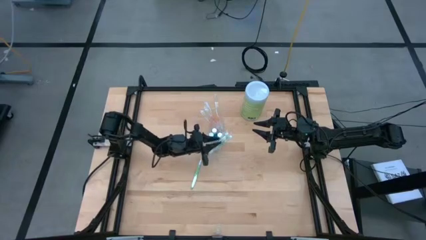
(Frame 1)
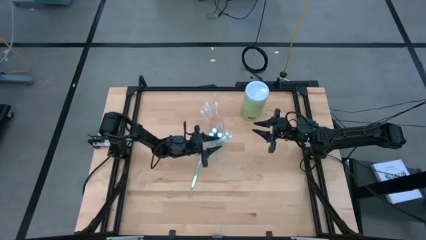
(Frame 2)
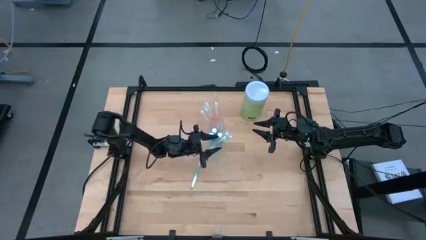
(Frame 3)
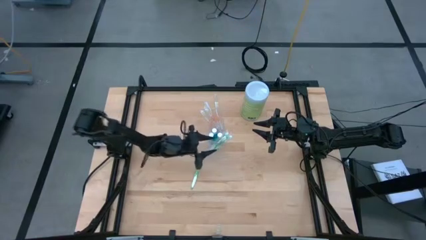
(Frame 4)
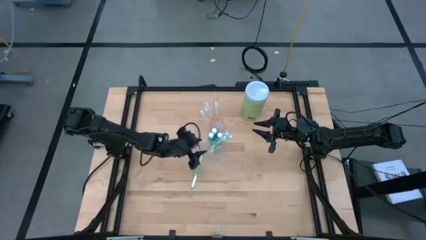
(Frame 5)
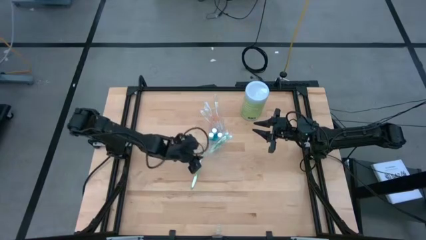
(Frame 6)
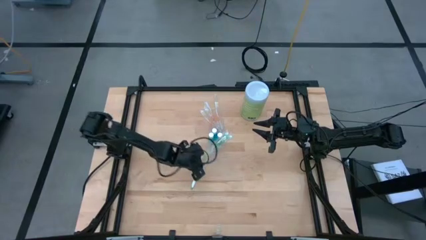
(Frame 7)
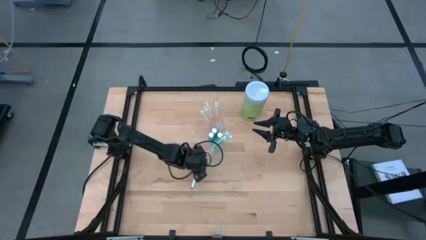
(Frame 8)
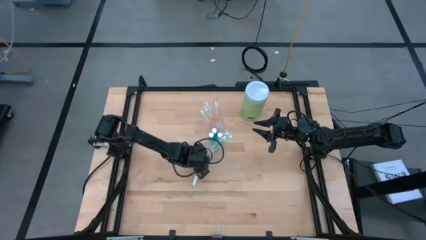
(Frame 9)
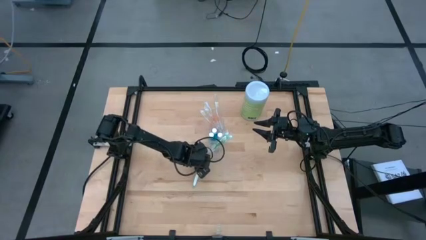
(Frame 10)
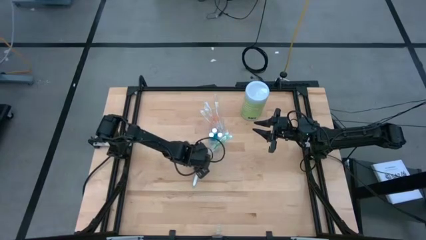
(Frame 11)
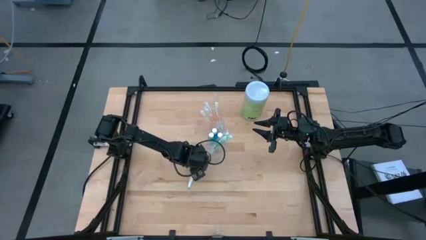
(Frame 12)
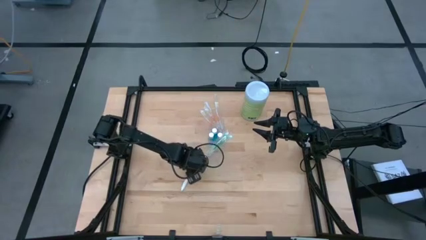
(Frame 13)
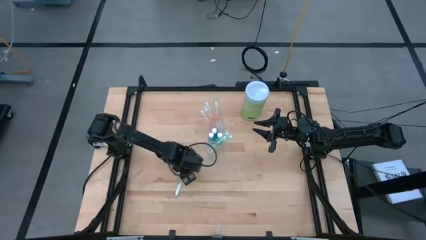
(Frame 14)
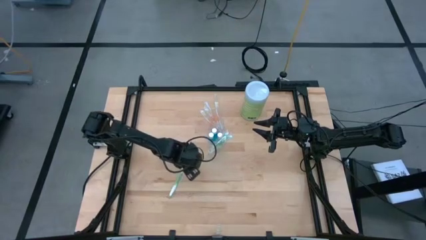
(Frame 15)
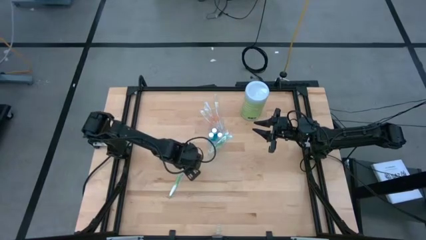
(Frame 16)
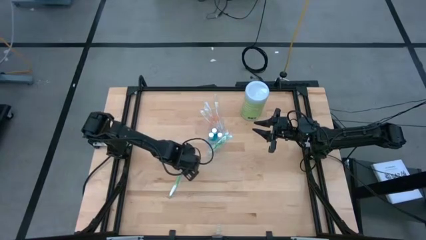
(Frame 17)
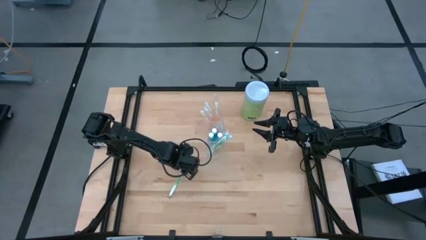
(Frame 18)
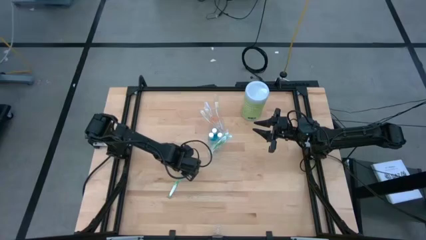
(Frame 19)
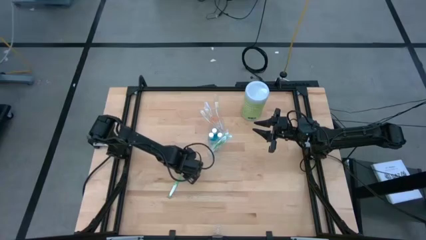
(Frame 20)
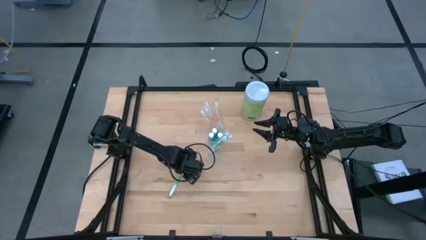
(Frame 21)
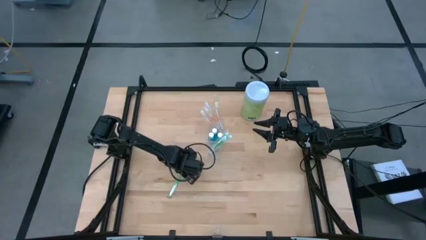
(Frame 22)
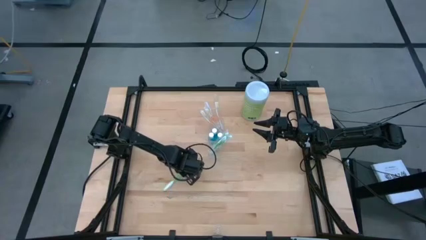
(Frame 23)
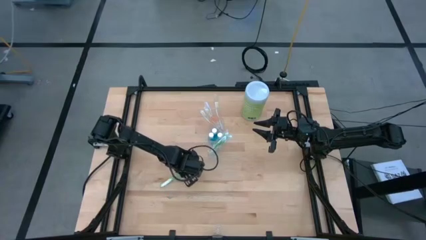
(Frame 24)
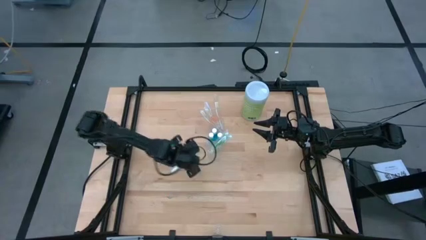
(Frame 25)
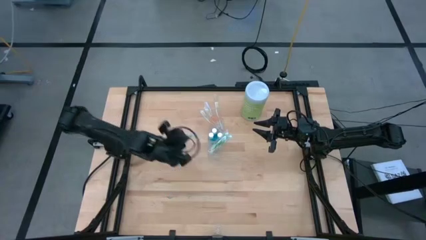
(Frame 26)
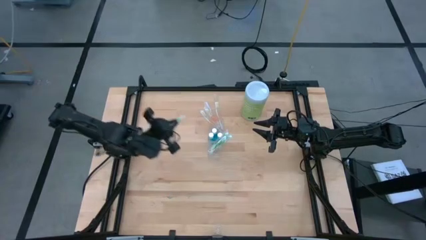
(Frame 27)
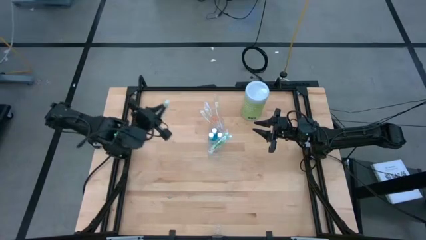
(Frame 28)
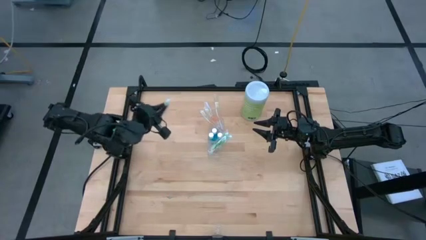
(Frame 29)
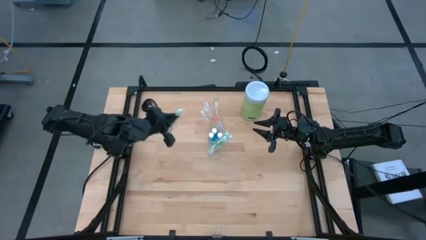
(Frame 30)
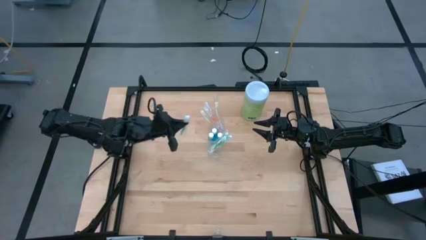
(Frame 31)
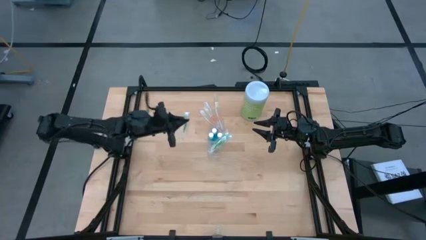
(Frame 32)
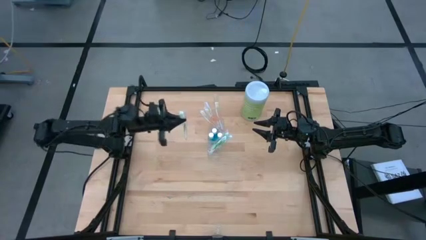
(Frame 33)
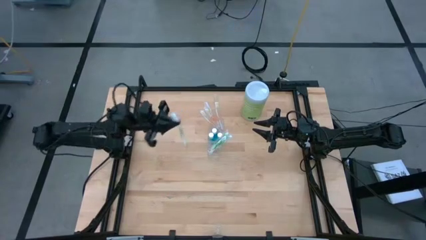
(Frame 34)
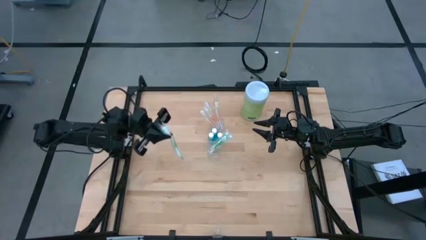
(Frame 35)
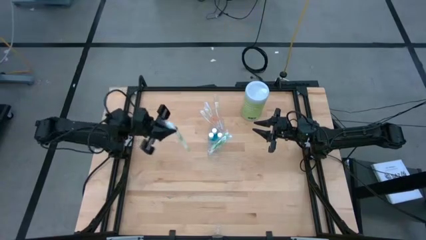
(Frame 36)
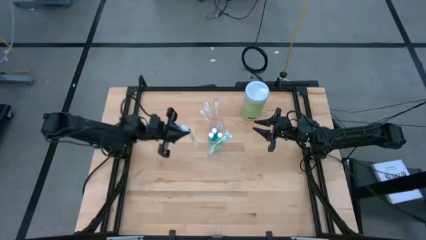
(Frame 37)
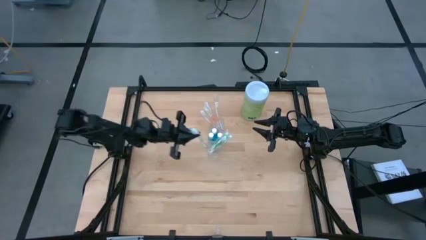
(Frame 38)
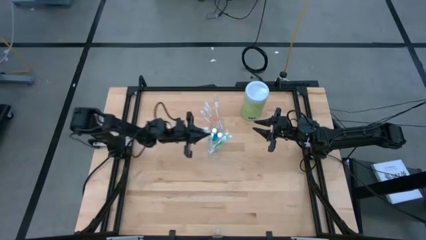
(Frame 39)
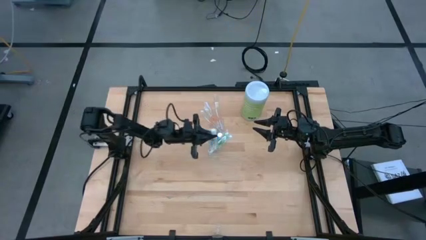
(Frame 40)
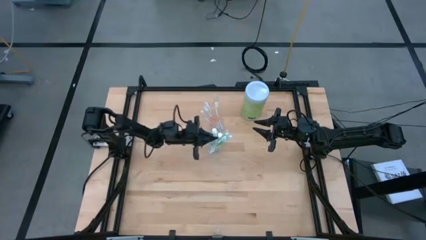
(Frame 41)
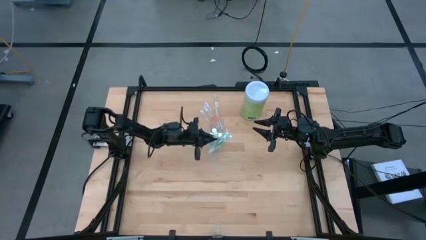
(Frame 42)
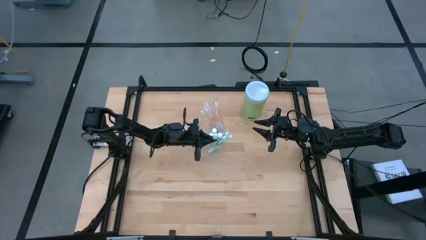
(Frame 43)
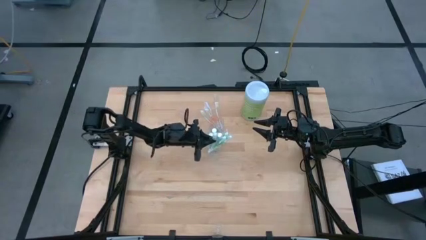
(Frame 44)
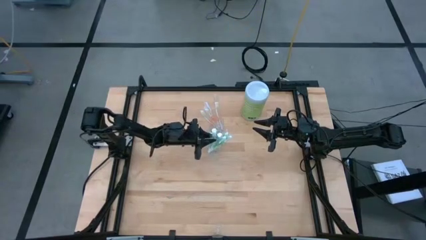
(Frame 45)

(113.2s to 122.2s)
Task: Pick & Place toothbrushing station
Put the green toothbrush with the other green toothbrush in the transparent organizer

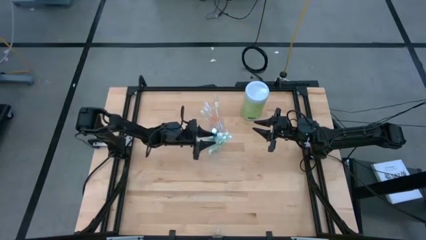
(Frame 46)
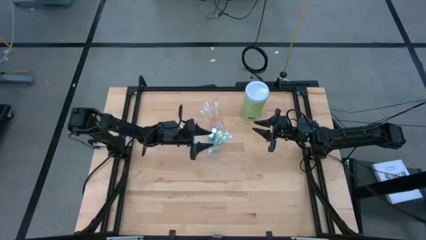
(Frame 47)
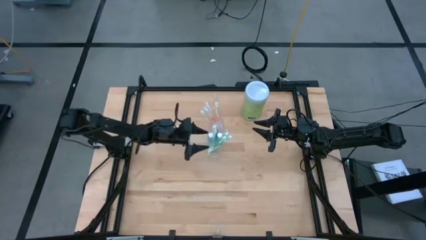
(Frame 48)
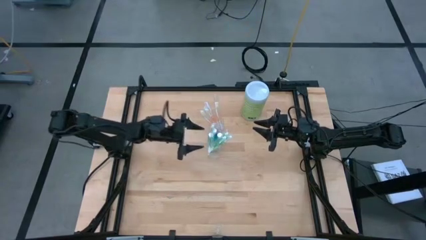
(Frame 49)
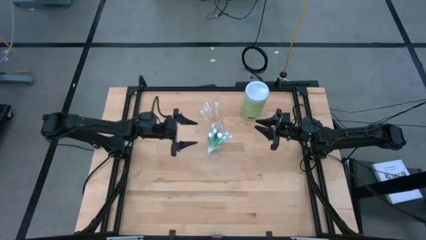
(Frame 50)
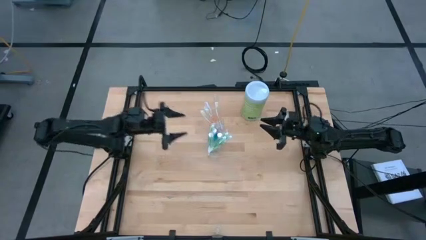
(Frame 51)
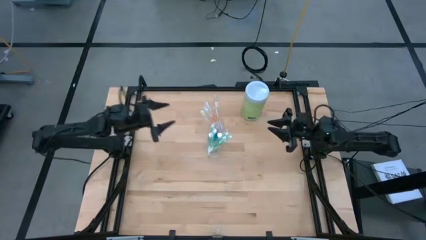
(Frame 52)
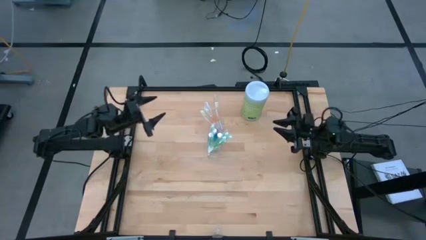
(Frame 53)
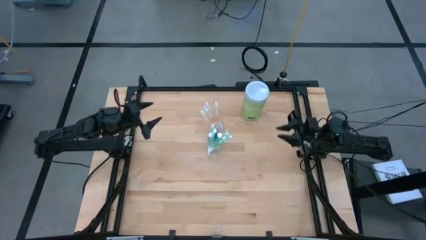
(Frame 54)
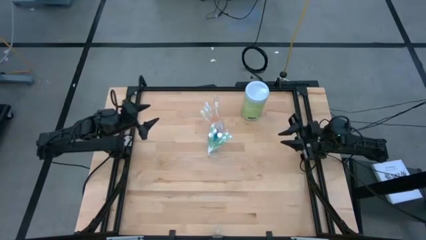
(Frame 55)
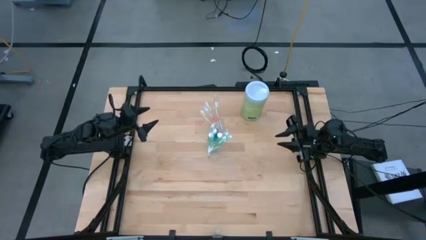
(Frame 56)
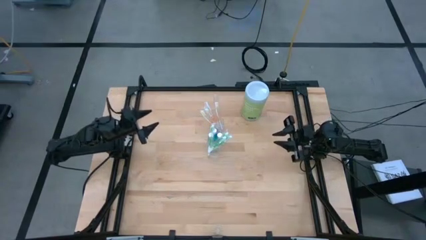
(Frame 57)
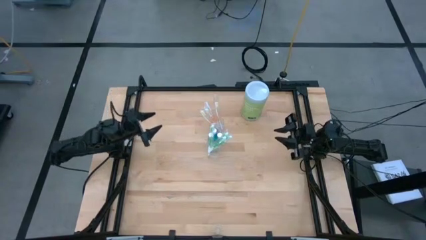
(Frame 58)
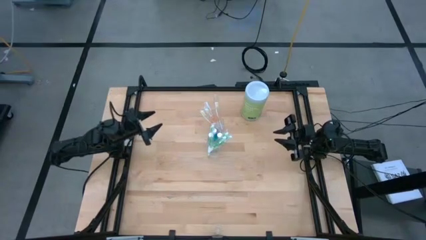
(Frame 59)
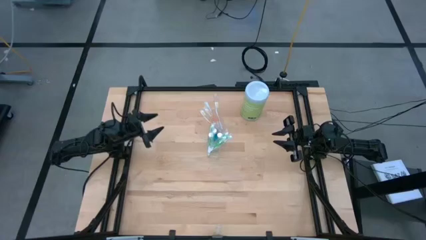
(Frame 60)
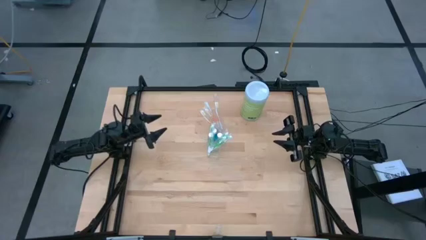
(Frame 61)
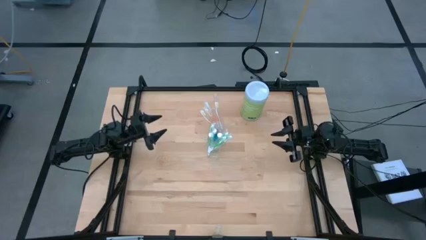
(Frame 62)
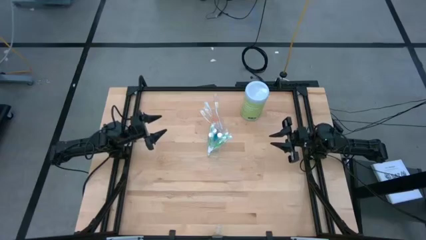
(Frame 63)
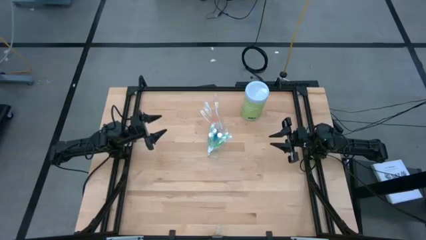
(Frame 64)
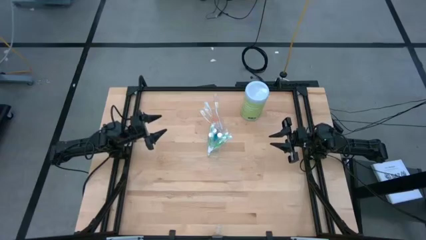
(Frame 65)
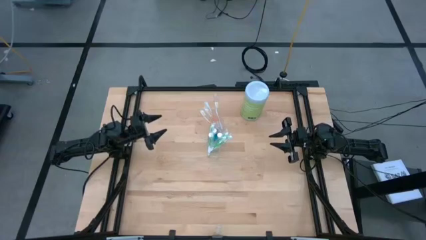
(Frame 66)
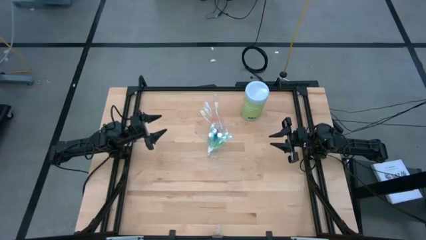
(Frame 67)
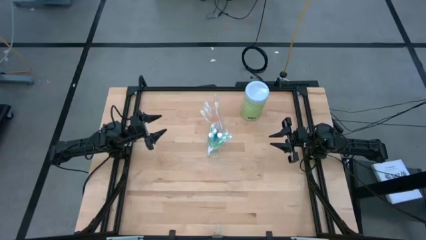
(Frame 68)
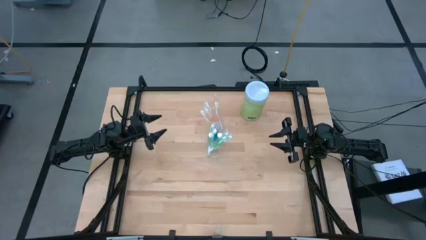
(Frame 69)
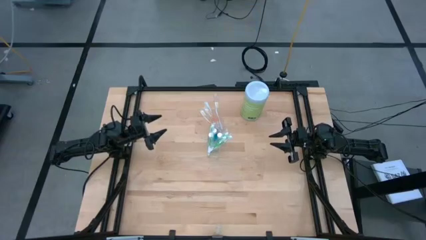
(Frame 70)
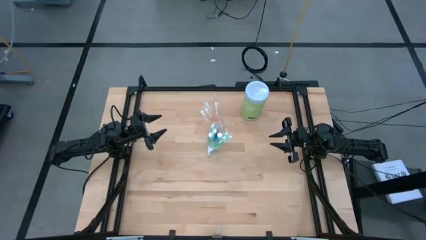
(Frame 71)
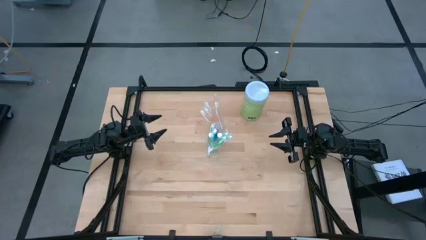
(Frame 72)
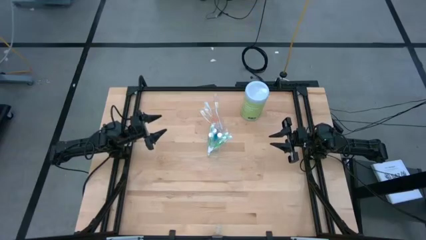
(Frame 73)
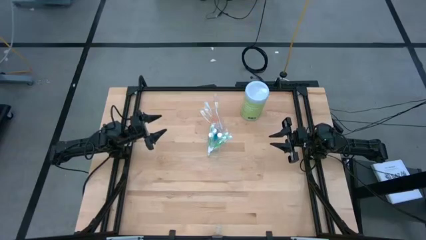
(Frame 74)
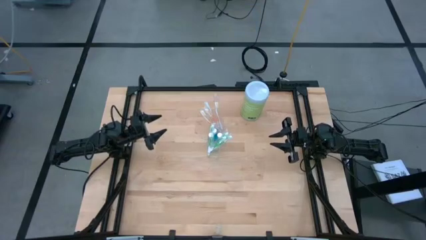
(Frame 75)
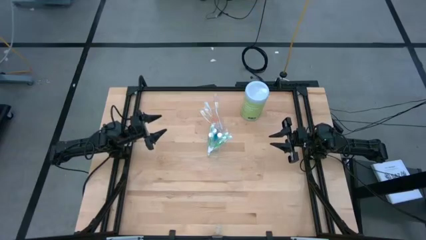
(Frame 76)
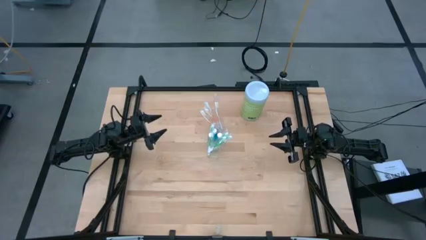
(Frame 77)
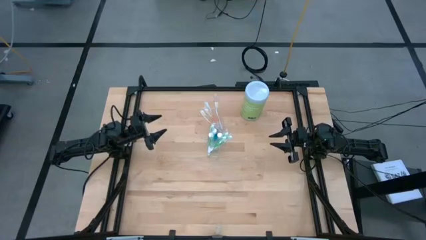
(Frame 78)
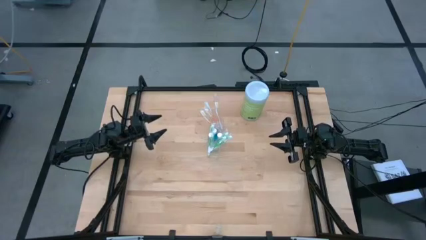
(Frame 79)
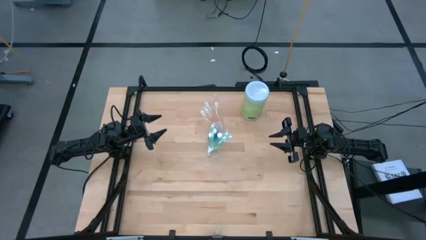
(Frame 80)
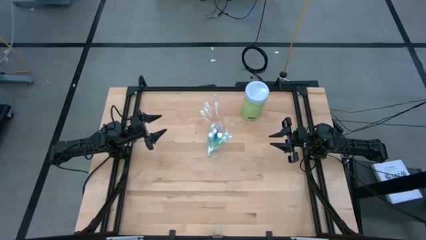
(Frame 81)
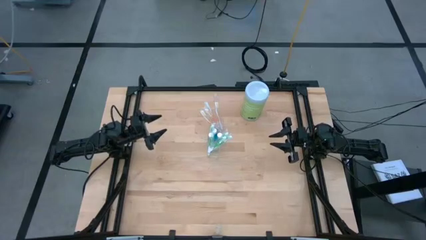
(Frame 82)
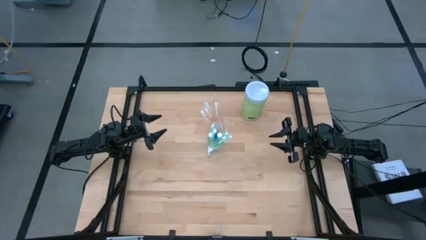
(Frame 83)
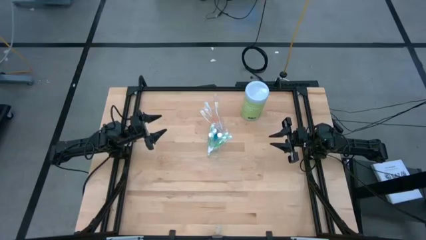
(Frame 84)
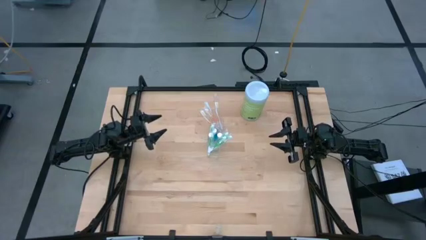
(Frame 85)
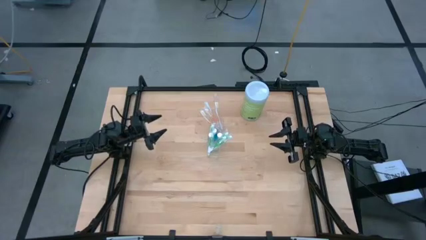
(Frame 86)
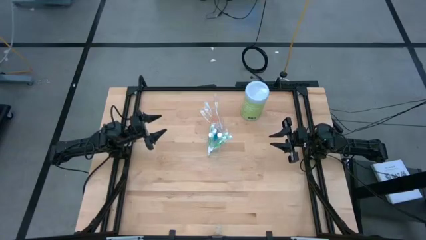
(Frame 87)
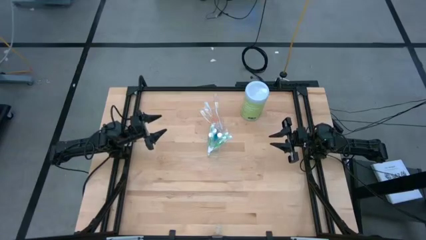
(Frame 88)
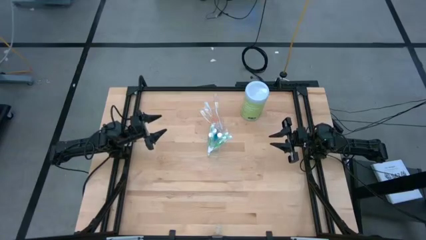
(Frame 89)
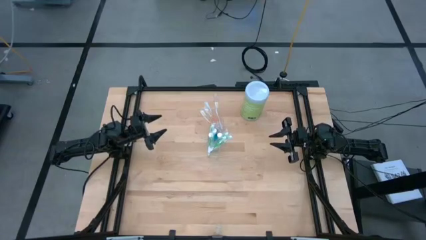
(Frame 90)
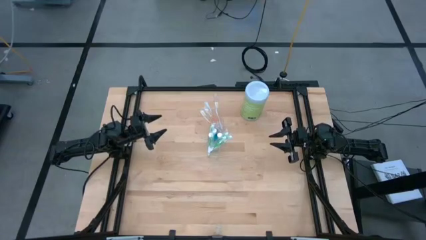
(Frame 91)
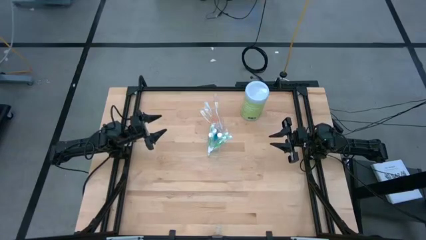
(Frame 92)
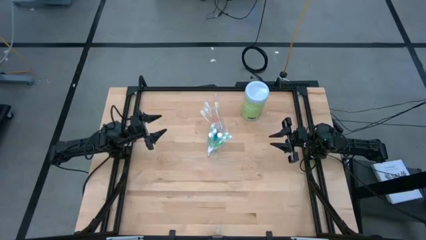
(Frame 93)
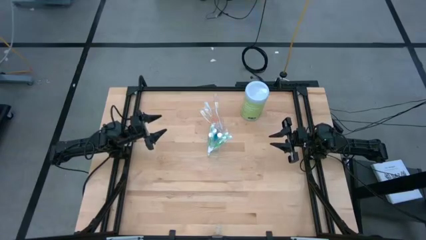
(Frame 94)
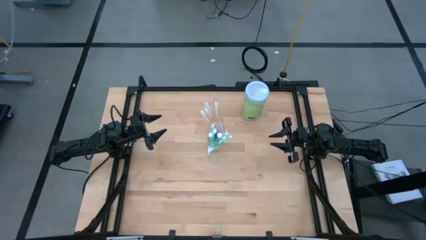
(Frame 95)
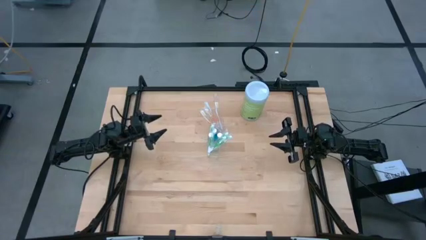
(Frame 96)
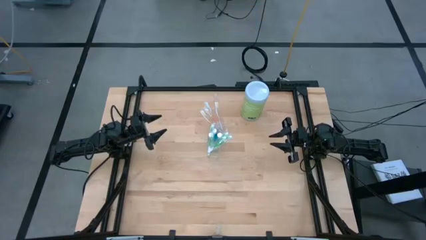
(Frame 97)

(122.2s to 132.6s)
Return to Home Position
